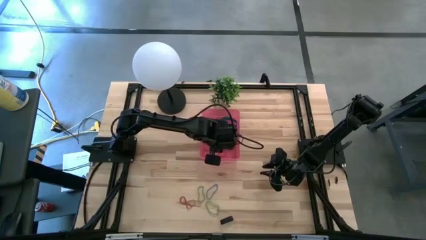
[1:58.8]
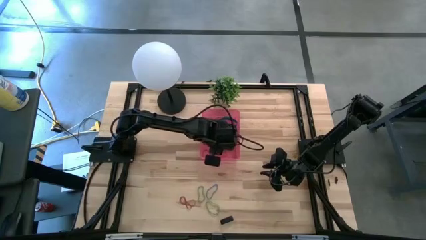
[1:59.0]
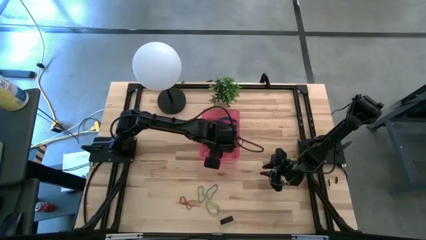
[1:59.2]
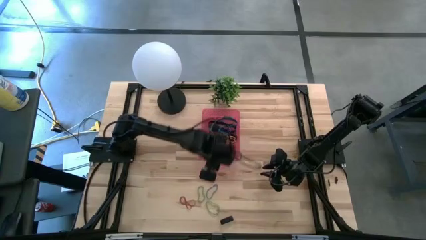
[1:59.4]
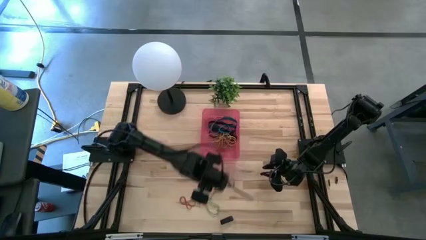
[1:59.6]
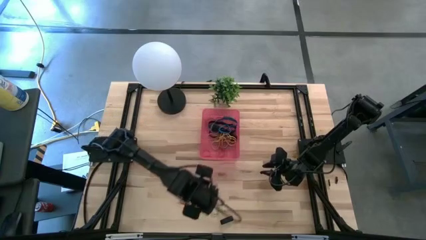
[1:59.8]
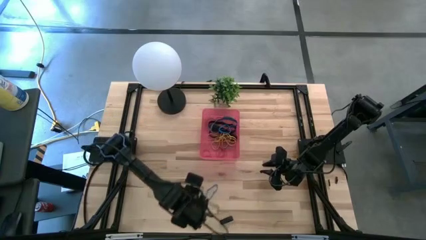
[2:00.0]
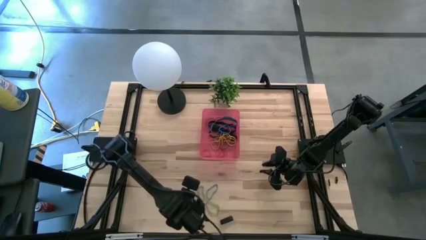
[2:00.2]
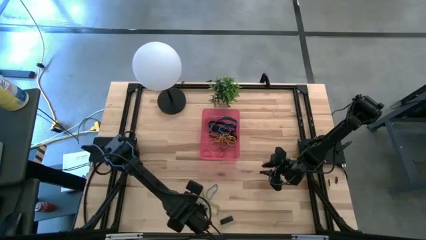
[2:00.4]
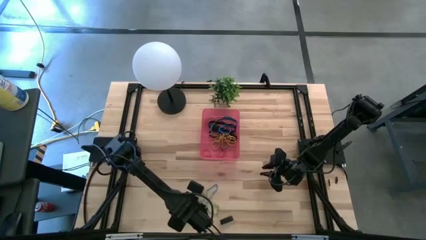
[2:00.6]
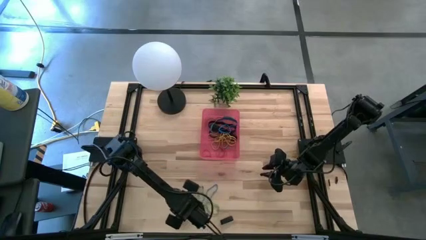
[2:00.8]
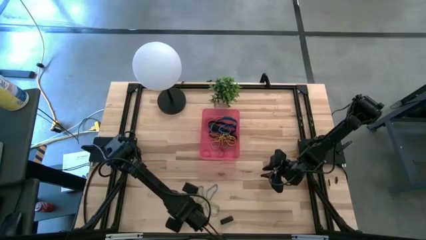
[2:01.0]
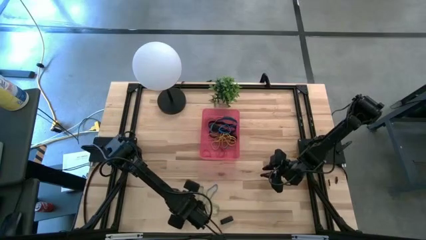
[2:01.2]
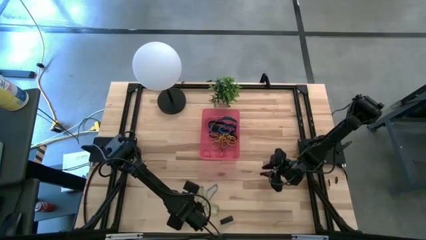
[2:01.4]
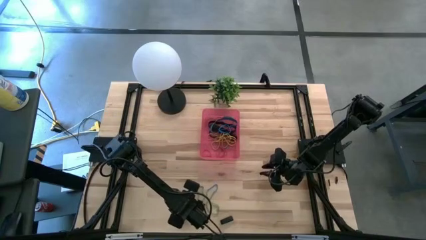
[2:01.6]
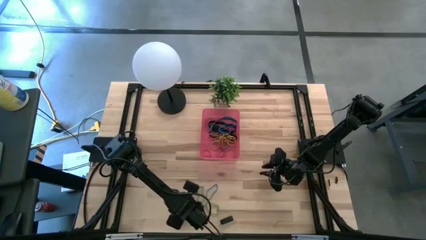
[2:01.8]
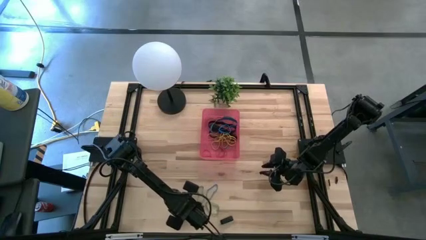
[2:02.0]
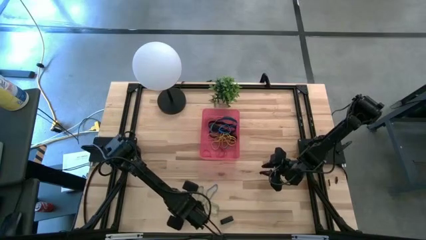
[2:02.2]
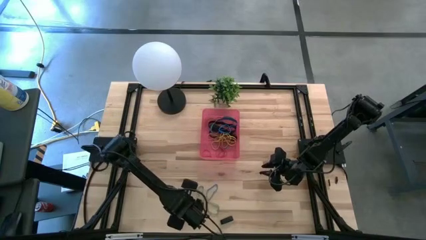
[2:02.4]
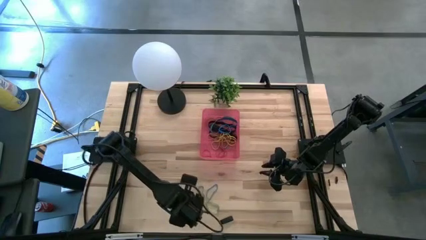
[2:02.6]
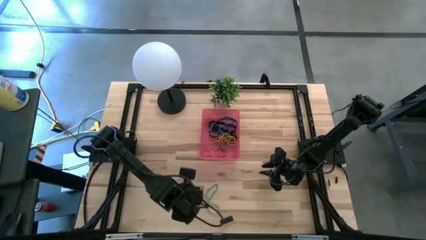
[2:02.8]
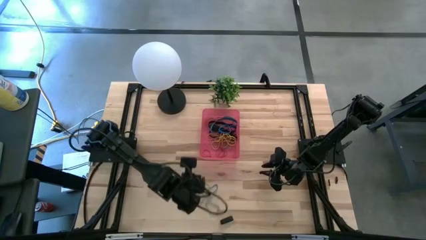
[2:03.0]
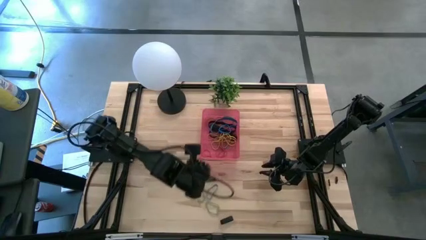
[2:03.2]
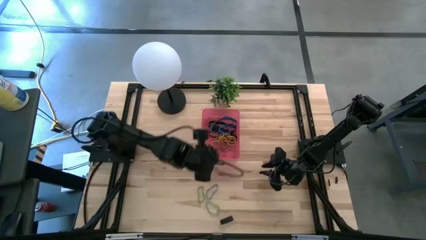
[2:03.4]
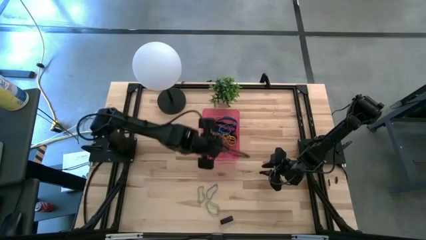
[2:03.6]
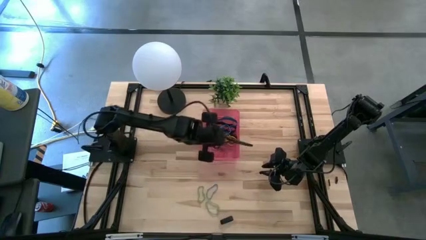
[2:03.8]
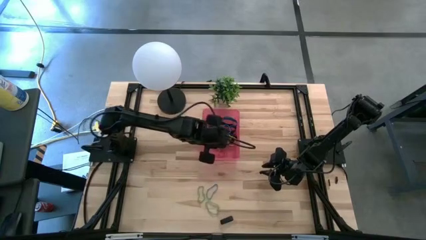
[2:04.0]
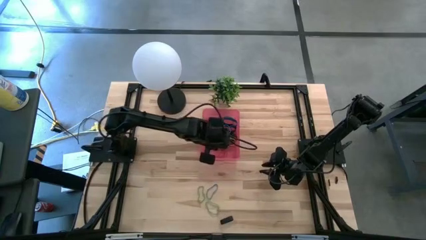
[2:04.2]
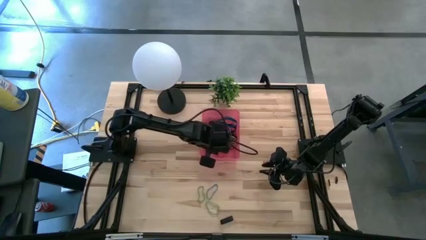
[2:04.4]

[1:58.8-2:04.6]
Task: Pick and place rubber bands into bin
Put the red rubber band into the red bin

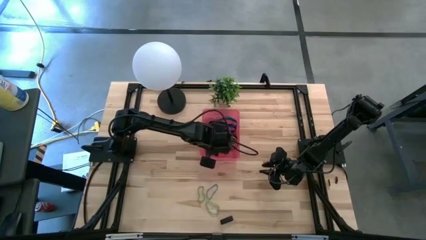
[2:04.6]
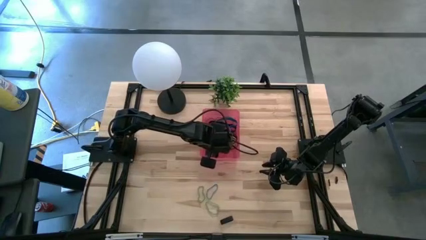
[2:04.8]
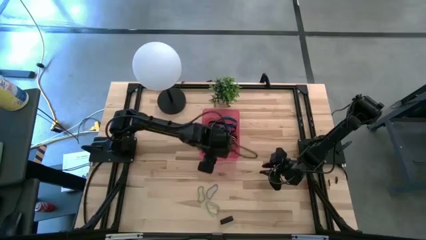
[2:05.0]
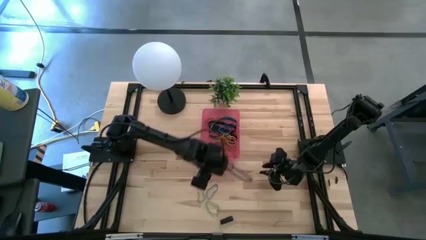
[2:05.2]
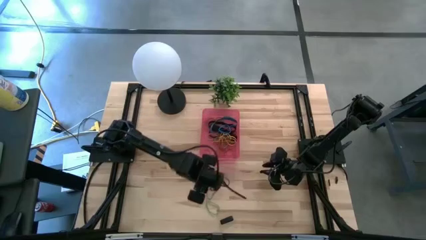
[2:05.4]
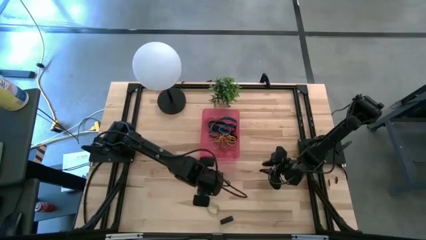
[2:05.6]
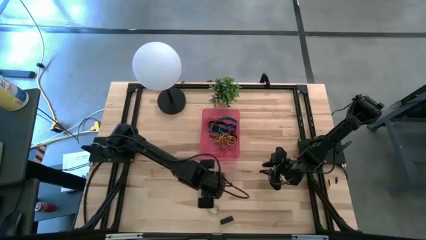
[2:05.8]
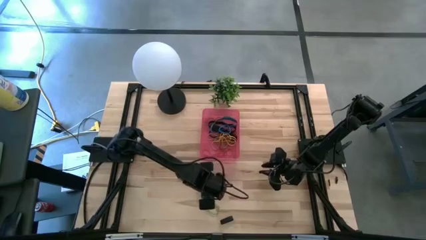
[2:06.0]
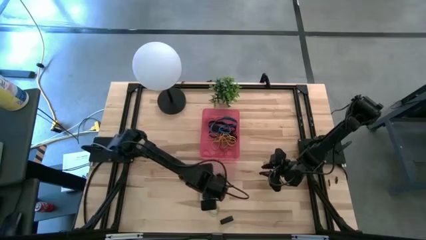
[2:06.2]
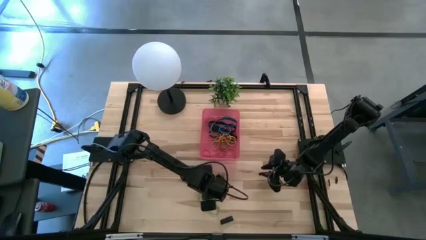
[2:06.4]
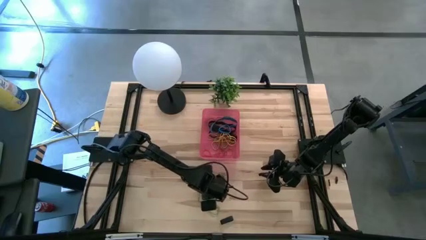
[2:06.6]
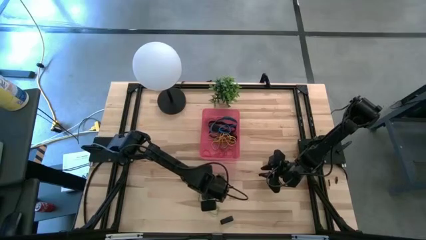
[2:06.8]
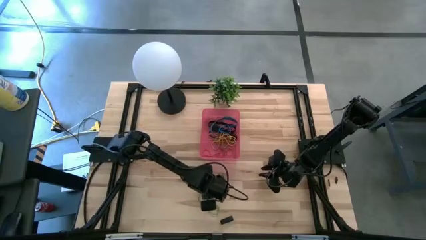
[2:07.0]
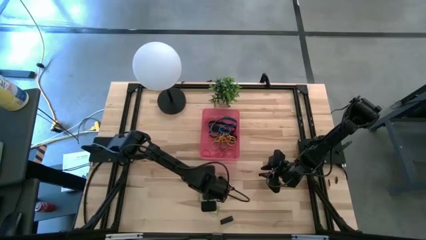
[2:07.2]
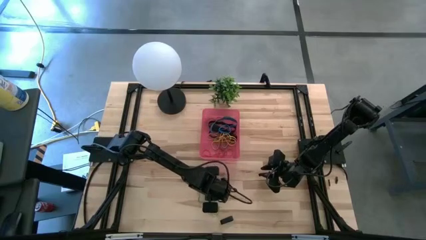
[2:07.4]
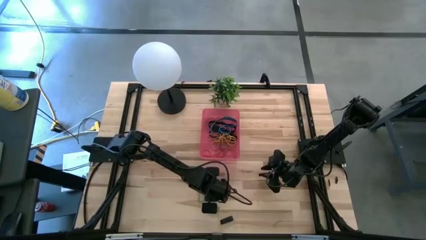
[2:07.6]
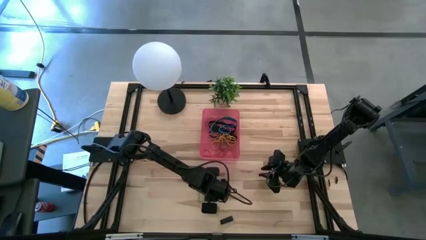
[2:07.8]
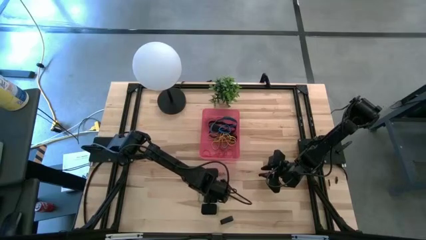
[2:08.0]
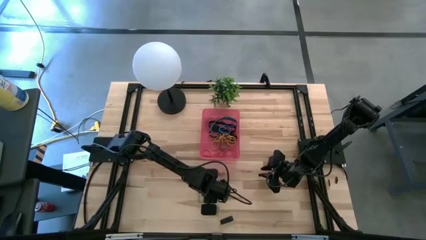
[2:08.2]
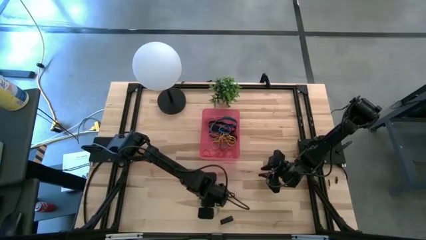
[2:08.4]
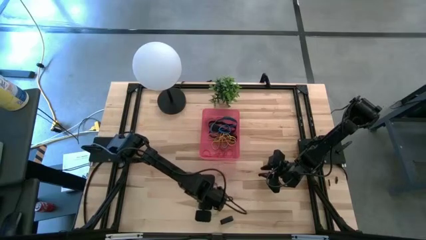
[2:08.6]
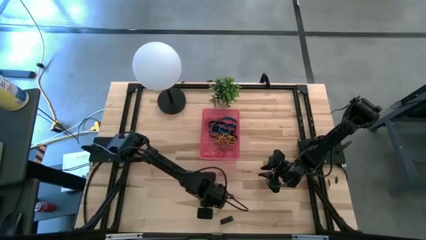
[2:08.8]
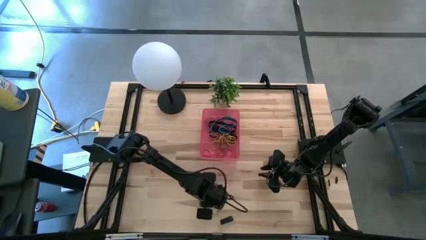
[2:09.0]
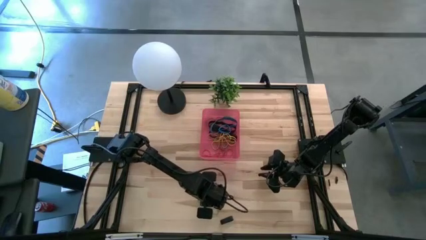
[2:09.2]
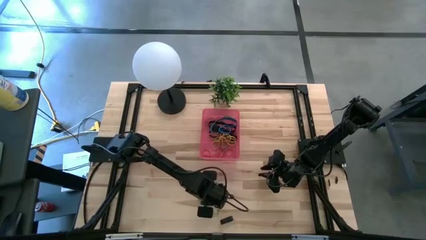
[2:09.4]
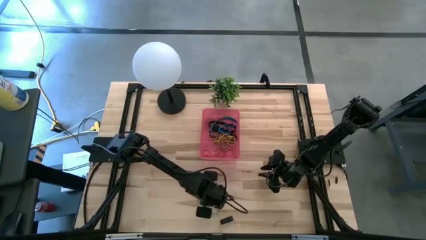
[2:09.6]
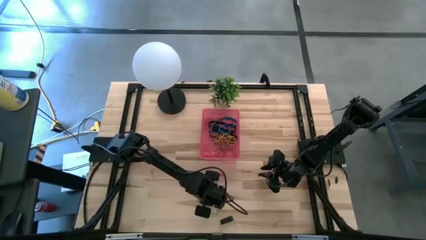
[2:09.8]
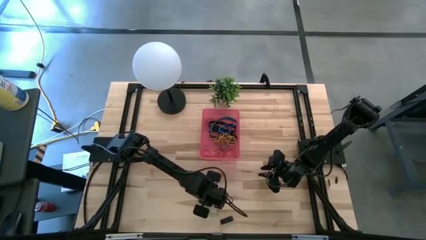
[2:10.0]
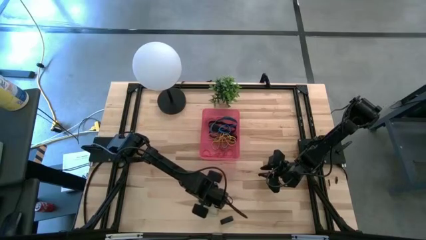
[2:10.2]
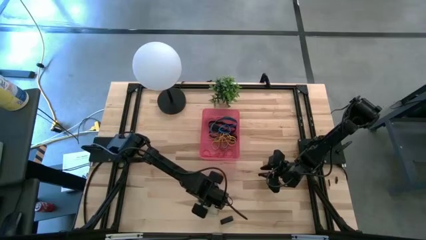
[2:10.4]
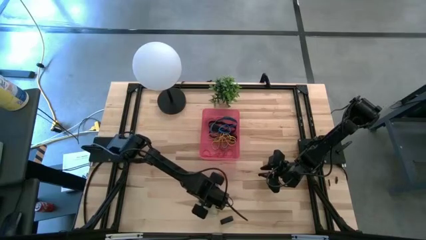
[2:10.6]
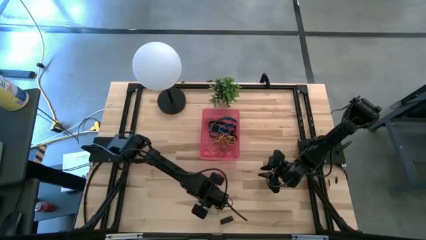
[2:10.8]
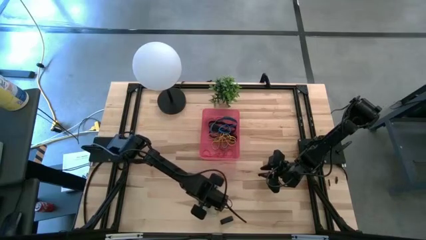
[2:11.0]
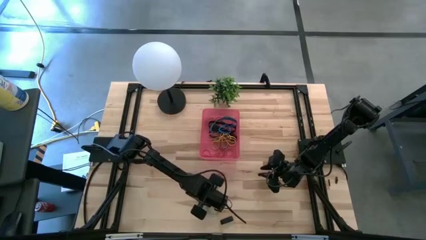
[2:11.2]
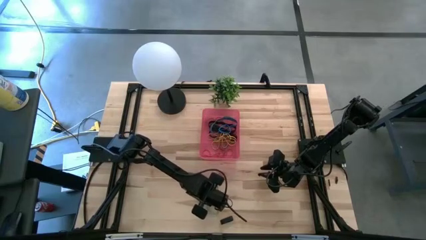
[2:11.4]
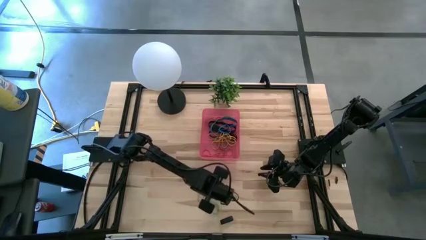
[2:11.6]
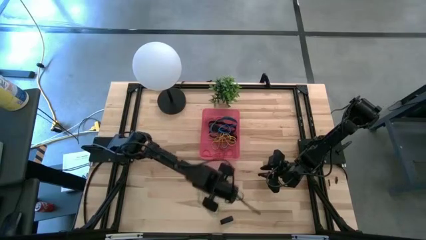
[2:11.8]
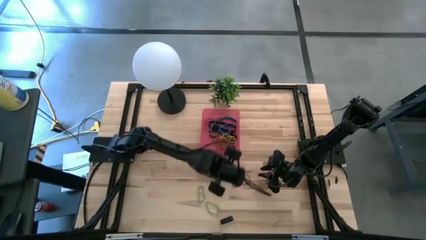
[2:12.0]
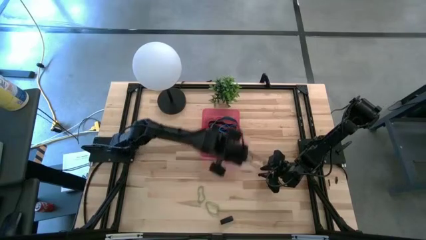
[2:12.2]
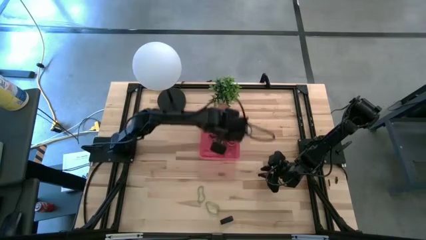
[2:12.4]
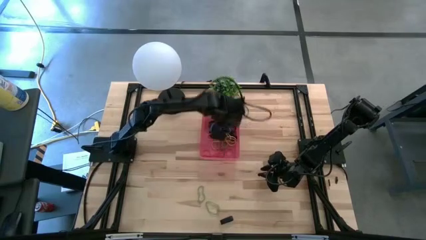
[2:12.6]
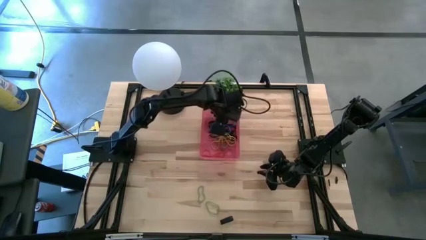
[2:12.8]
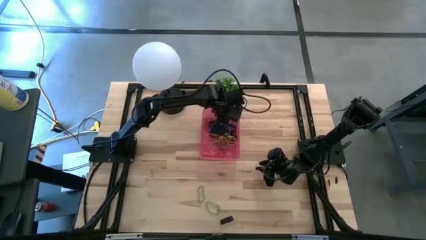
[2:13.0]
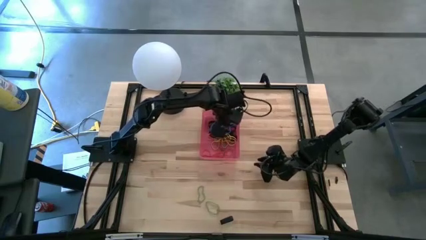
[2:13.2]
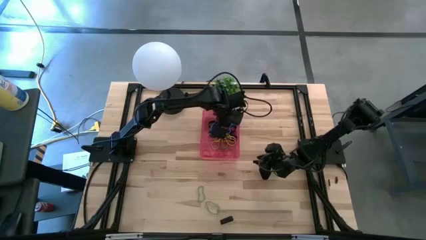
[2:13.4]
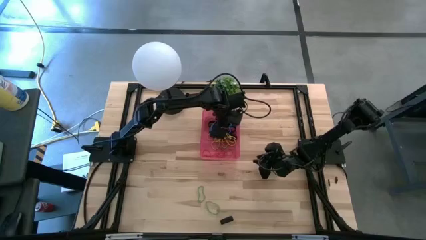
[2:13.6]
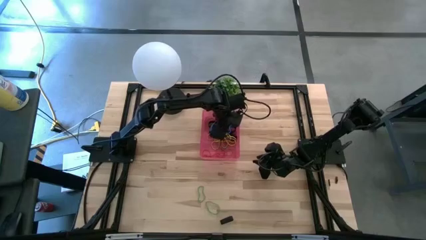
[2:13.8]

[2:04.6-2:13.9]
Put the blue rubber band into the red bin
